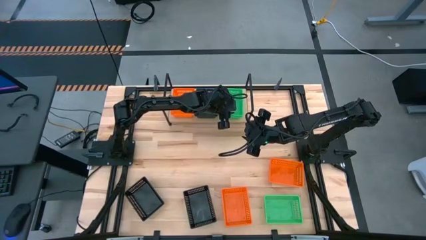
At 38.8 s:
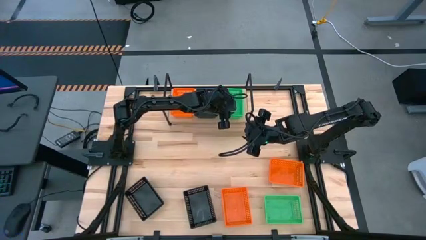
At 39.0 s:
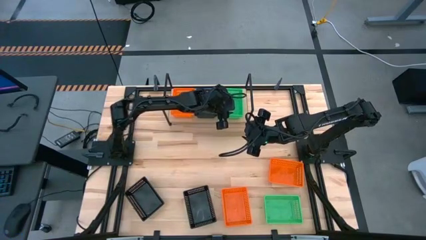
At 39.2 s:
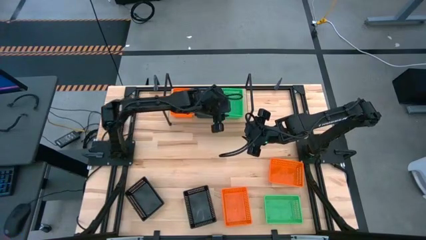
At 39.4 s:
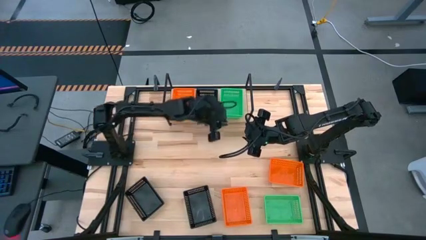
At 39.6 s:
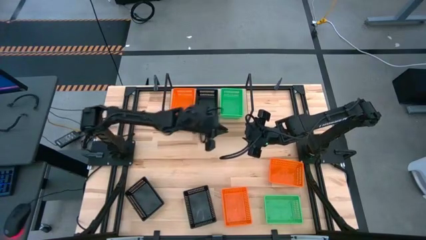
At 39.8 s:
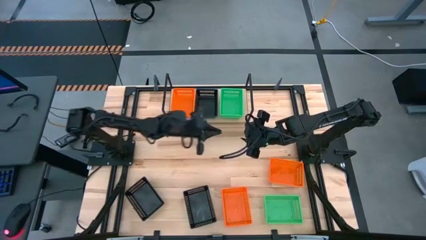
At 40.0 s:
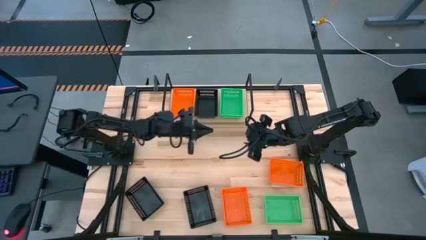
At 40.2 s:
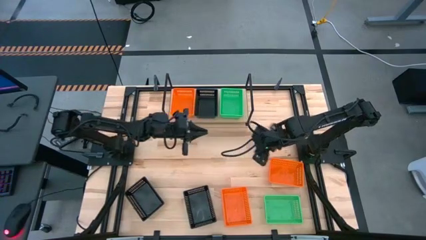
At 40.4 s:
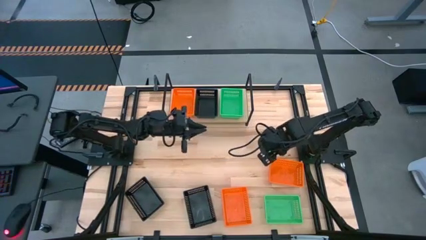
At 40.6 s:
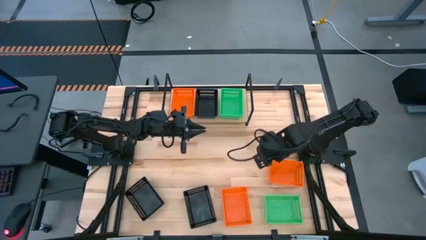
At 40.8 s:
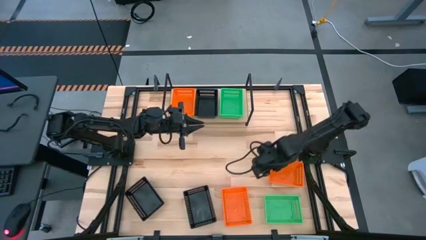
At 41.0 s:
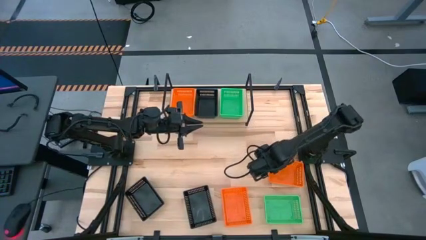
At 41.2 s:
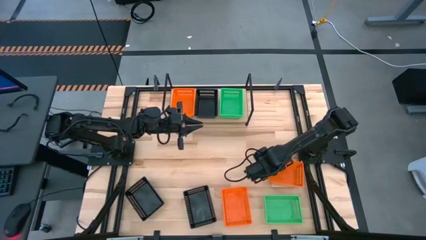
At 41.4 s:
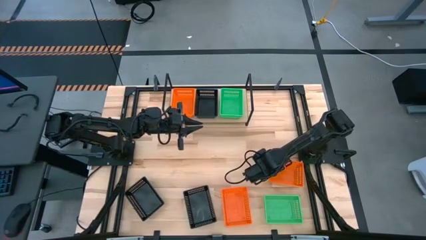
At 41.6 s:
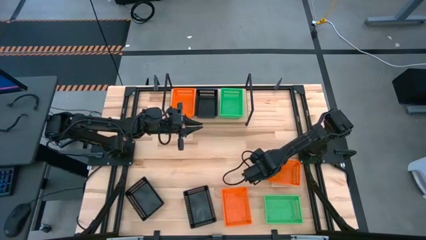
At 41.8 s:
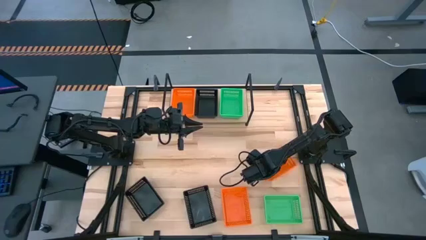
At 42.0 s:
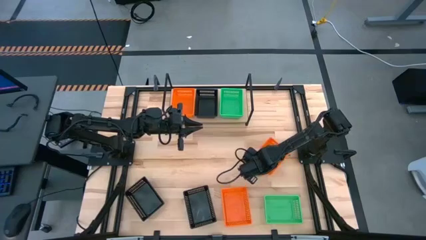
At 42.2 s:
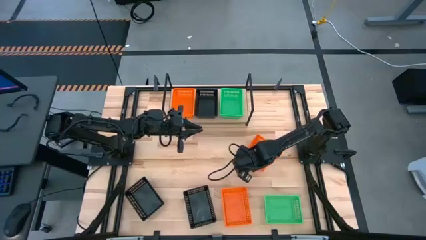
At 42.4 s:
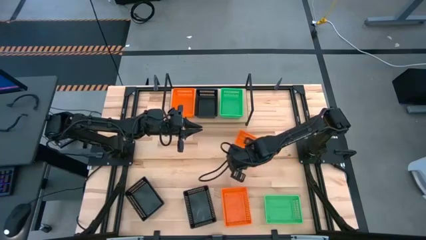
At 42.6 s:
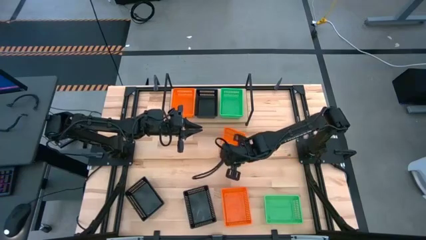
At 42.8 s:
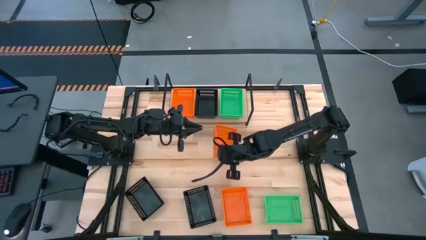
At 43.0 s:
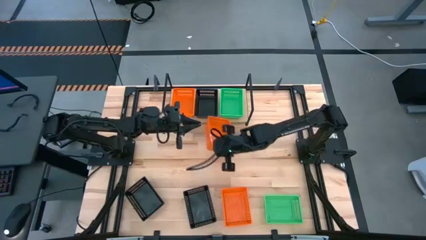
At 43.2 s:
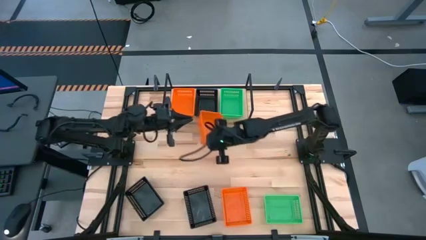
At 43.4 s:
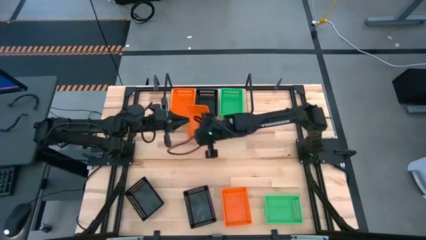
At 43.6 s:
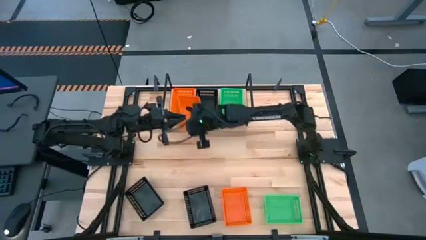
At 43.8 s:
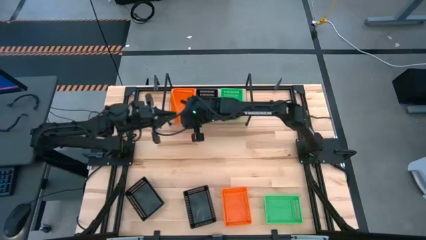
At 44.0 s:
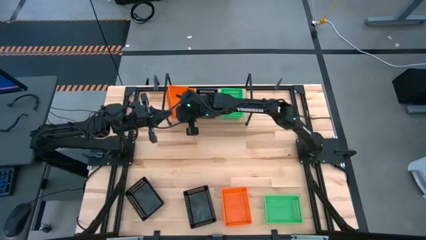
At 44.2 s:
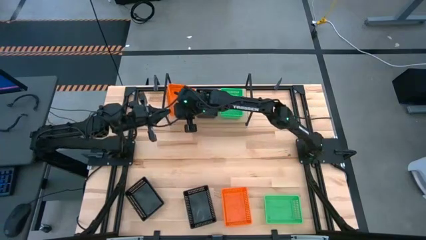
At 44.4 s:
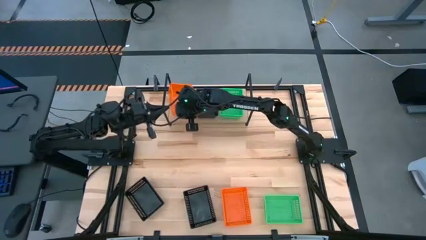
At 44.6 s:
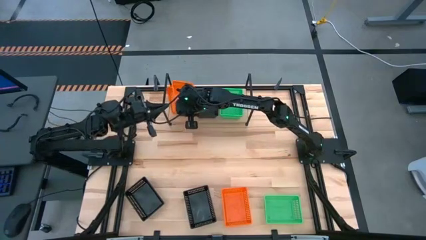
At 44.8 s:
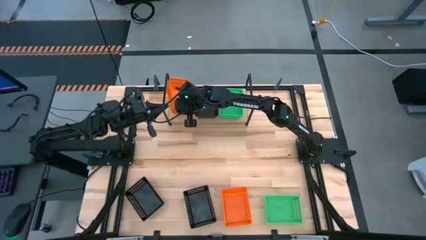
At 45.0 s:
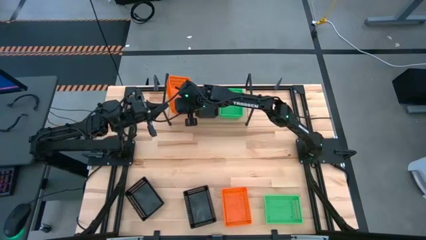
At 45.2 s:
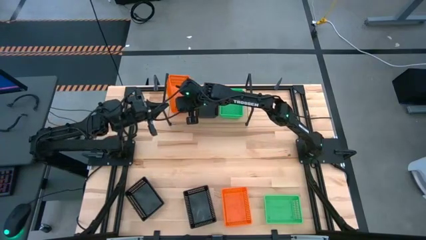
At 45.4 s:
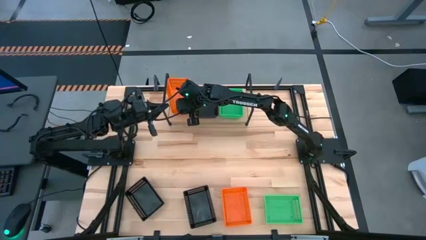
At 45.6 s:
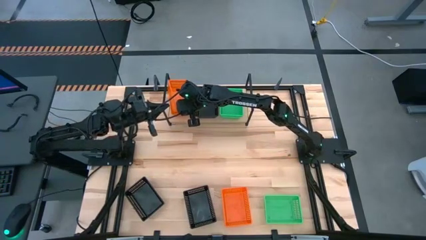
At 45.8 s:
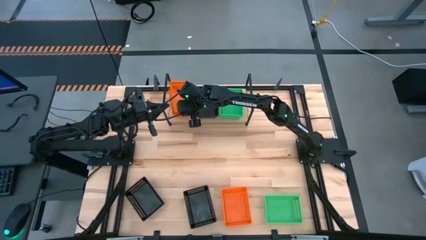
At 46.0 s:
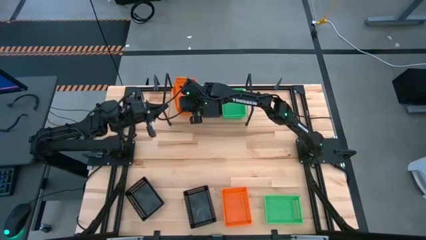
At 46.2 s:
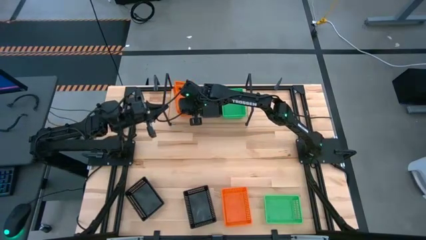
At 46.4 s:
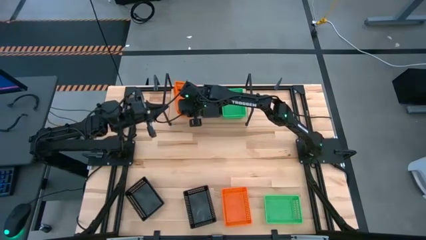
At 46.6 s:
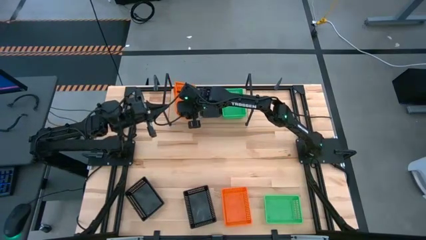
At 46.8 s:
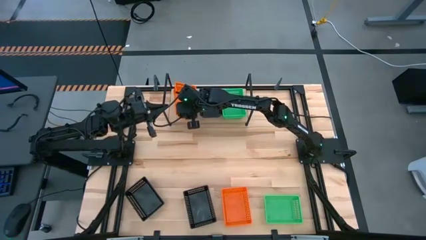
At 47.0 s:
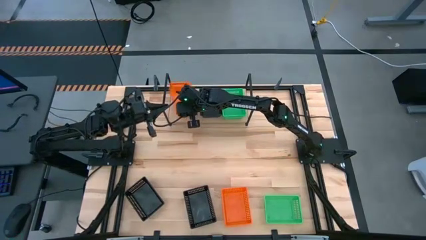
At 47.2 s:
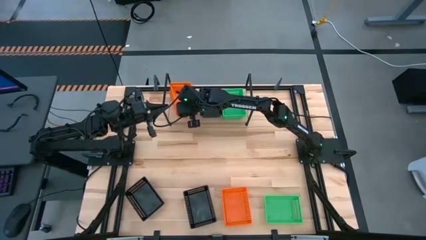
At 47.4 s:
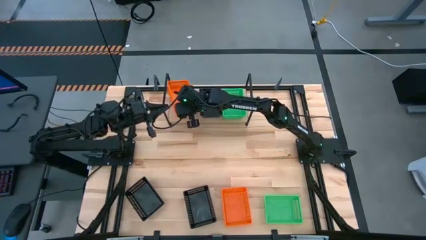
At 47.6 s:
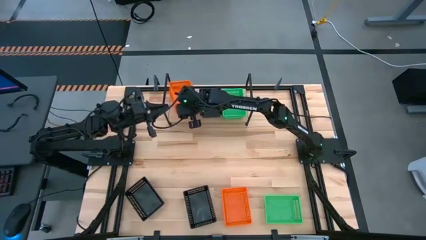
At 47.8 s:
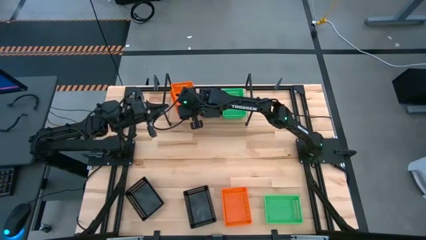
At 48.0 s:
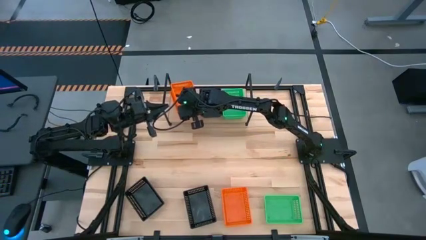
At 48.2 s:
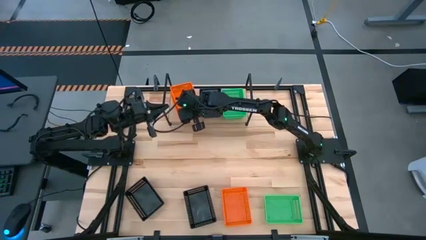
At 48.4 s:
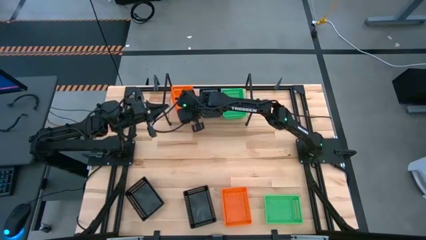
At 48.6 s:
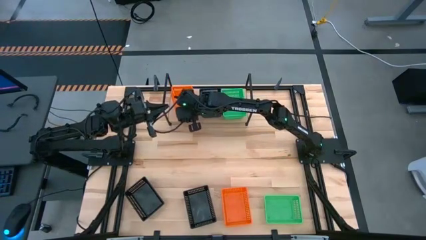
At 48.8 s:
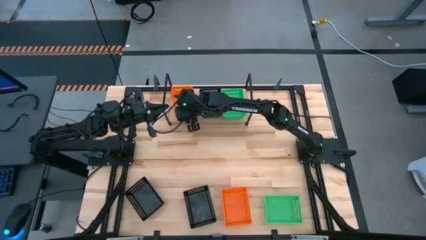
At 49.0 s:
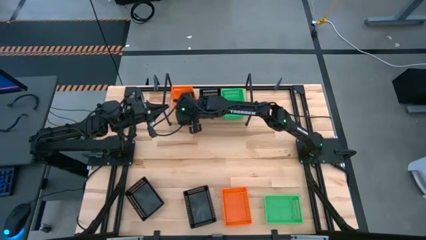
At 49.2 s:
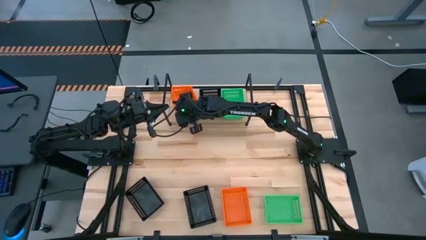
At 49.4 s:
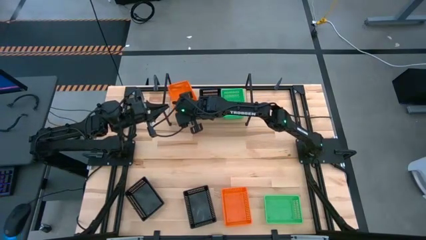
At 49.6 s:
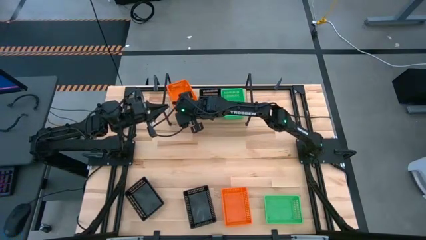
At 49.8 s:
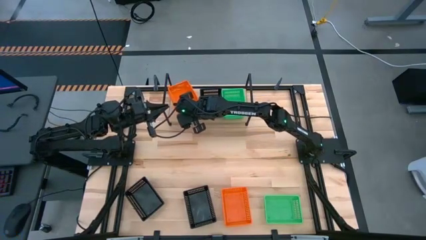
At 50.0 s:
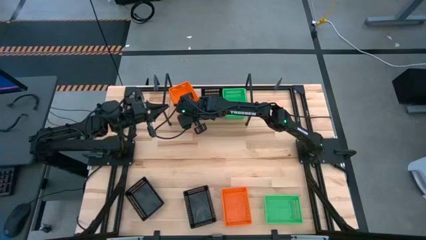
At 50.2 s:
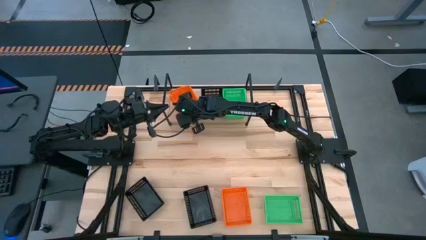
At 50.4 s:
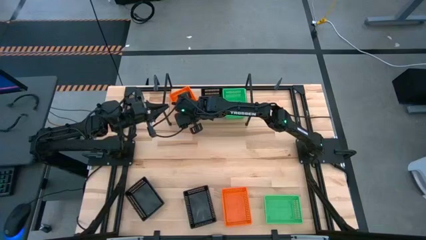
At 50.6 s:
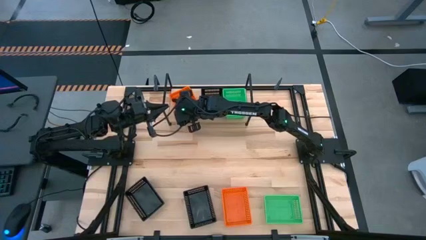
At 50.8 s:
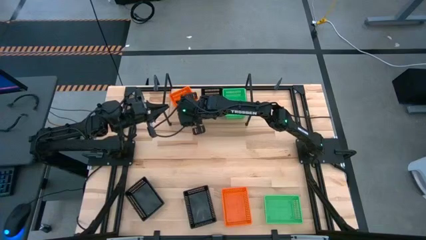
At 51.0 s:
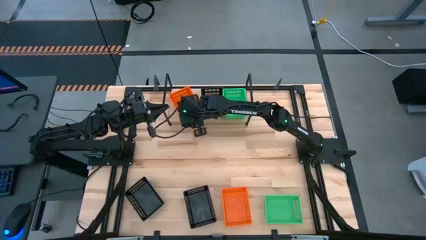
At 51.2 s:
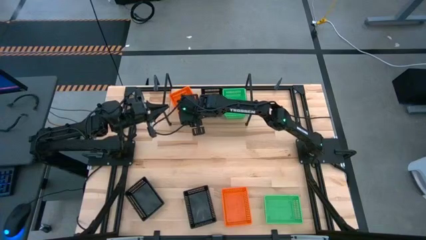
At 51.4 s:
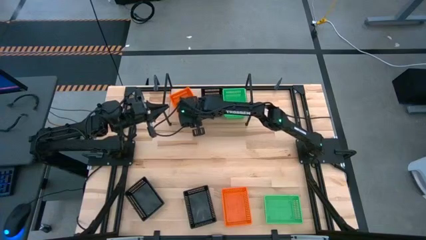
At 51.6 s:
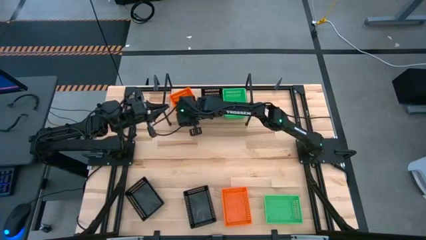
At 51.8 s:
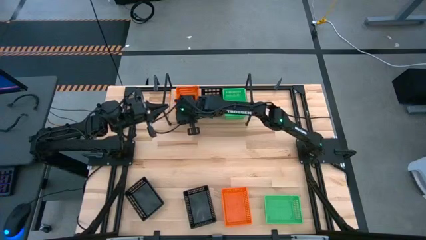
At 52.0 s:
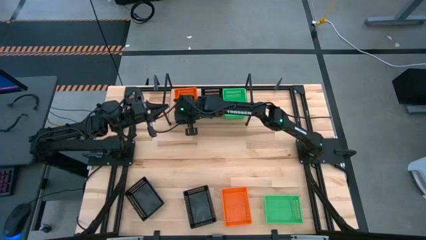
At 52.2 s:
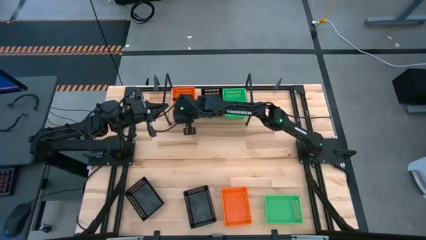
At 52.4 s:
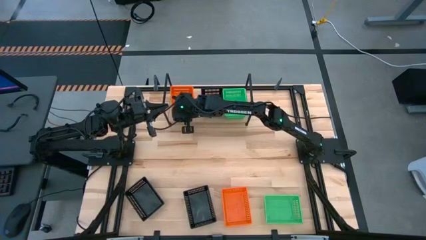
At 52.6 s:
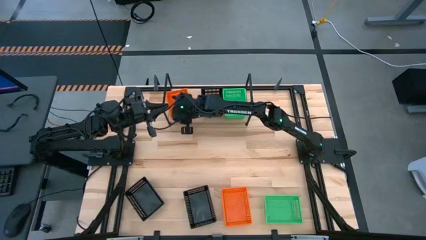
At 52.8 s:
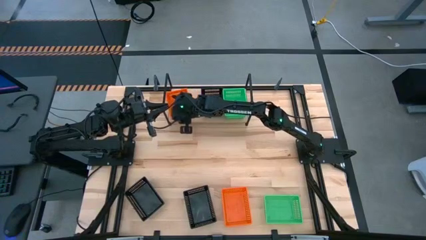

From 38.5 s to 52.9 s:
Task: Stack baskets on shelf by color
Stack the top orange bin on top of the orange bin on the shelf
